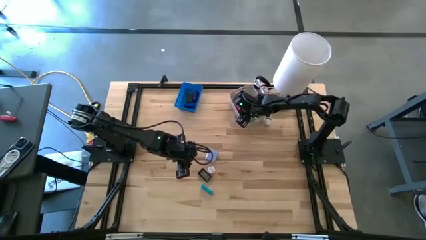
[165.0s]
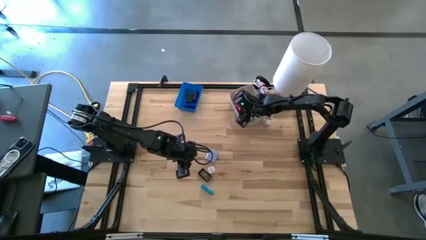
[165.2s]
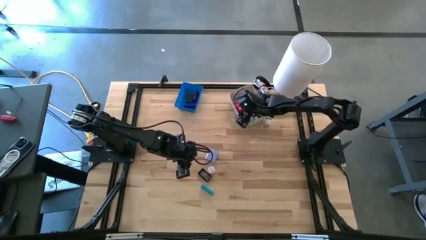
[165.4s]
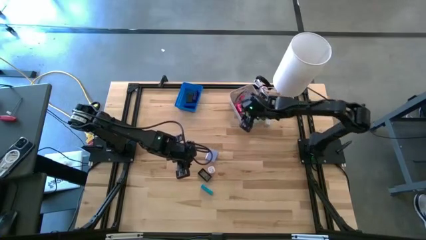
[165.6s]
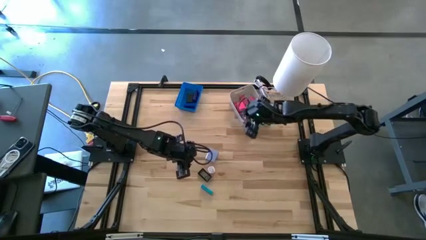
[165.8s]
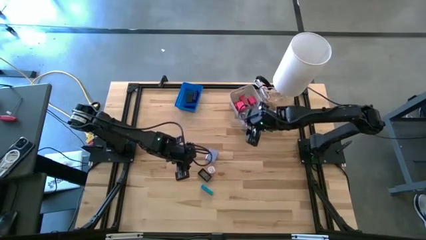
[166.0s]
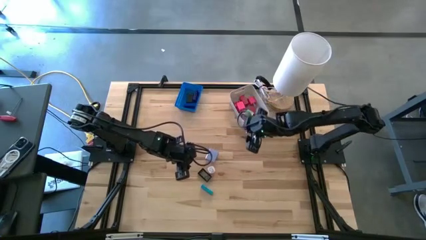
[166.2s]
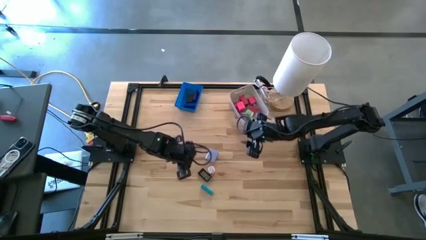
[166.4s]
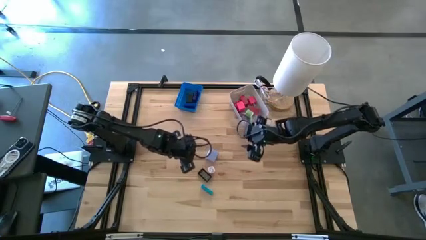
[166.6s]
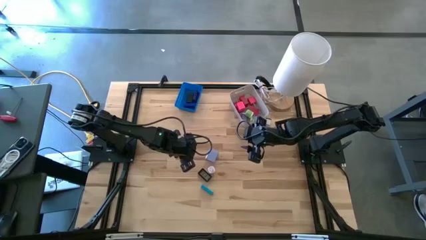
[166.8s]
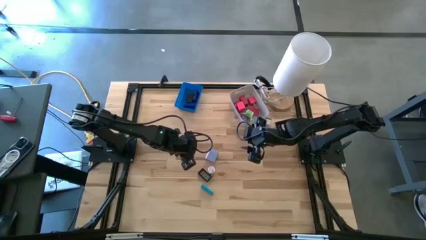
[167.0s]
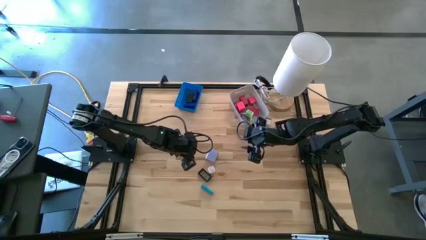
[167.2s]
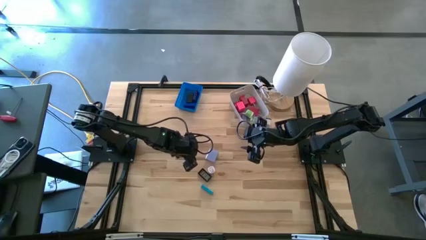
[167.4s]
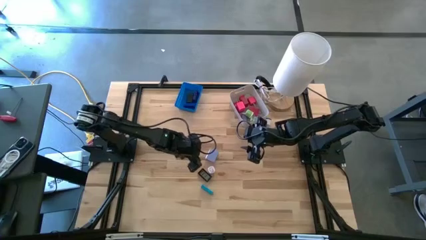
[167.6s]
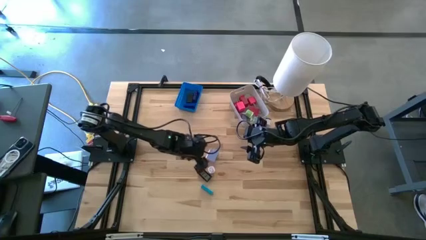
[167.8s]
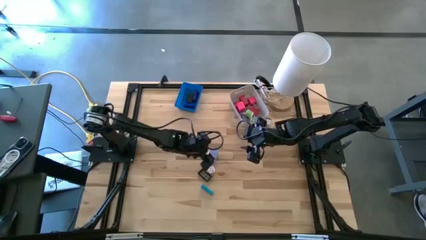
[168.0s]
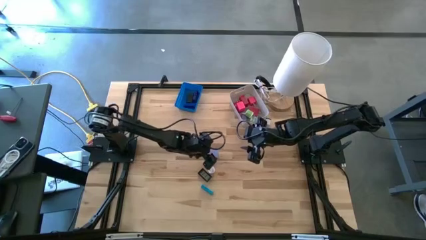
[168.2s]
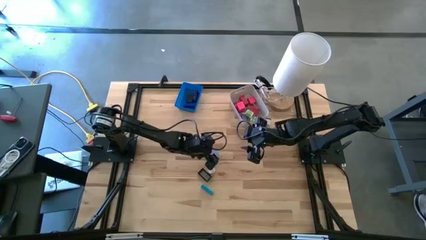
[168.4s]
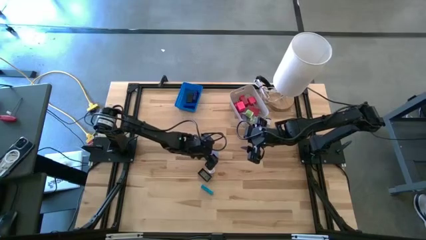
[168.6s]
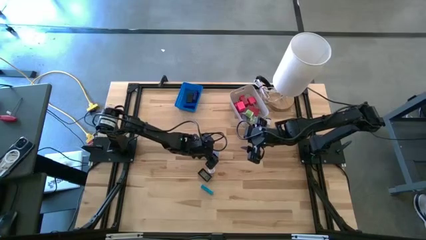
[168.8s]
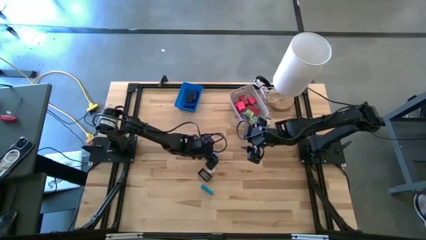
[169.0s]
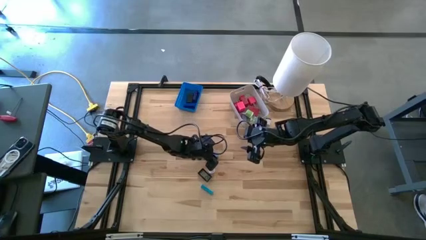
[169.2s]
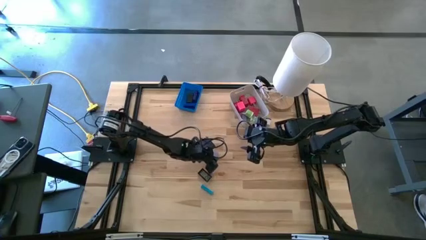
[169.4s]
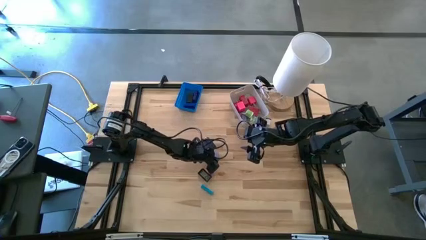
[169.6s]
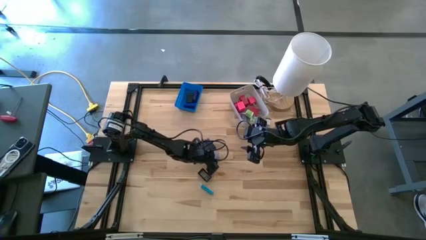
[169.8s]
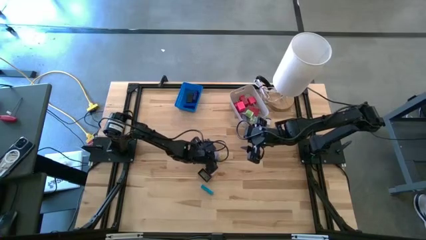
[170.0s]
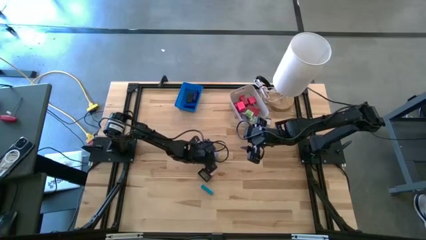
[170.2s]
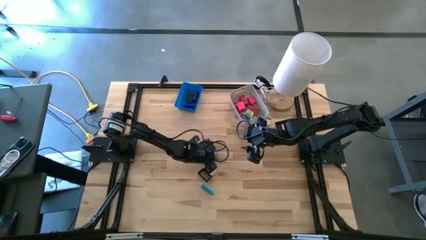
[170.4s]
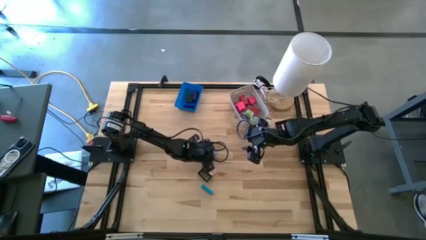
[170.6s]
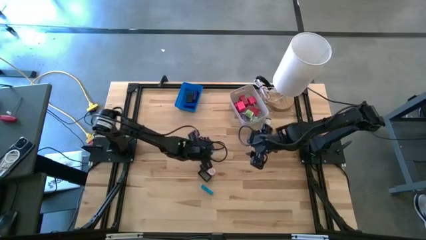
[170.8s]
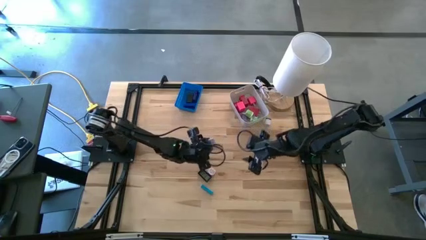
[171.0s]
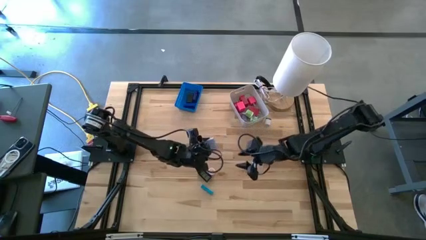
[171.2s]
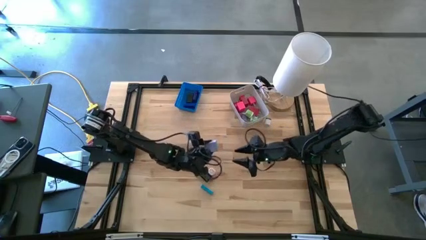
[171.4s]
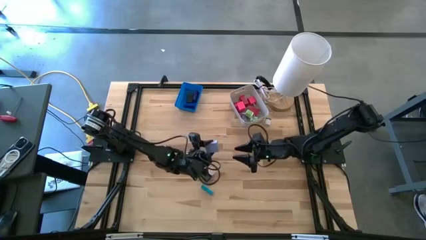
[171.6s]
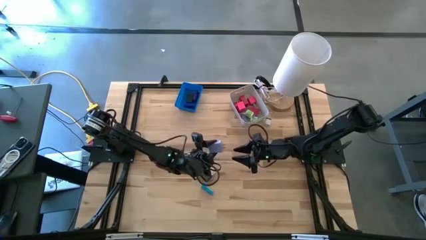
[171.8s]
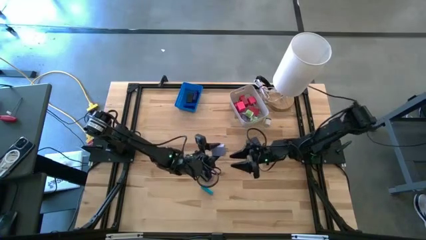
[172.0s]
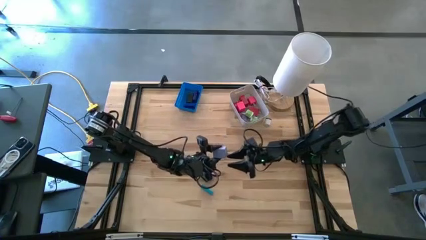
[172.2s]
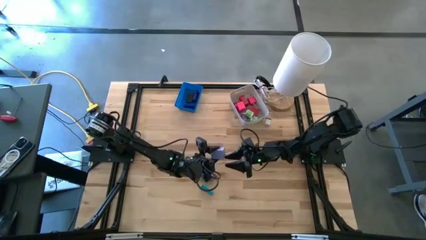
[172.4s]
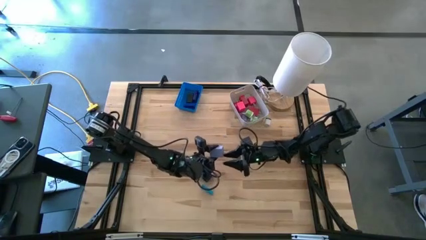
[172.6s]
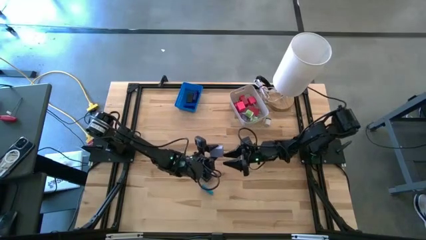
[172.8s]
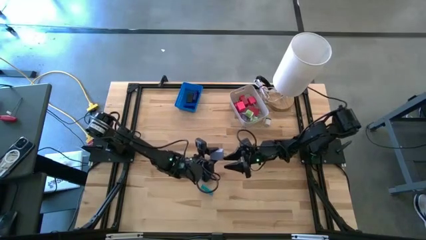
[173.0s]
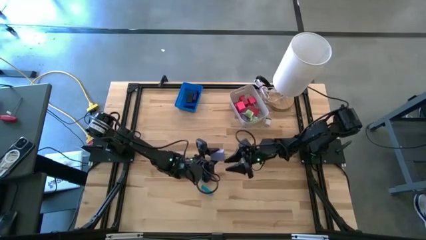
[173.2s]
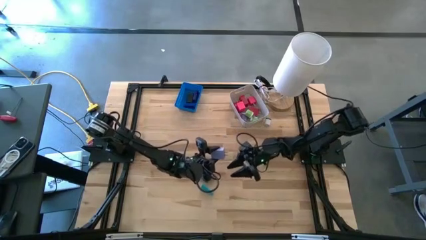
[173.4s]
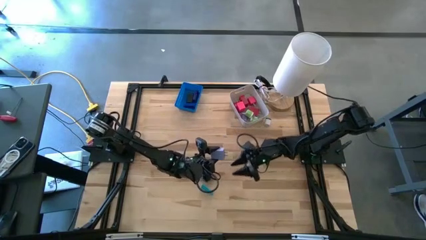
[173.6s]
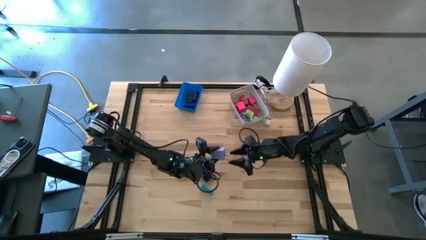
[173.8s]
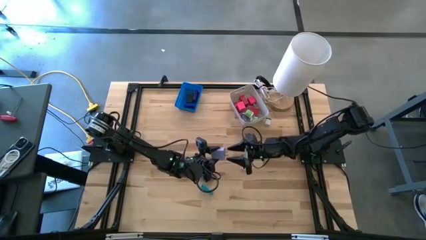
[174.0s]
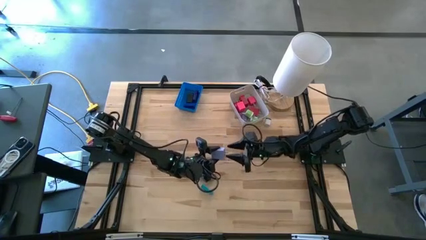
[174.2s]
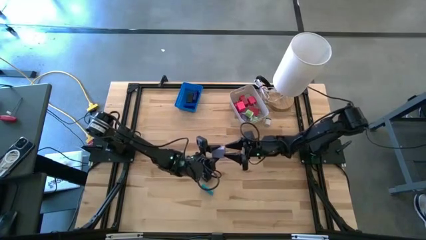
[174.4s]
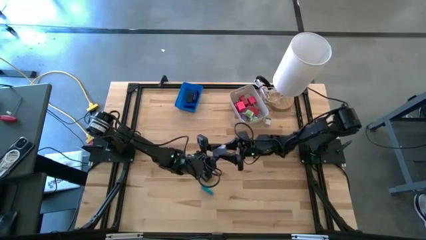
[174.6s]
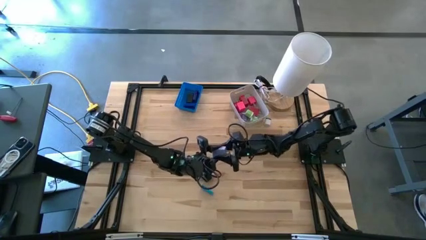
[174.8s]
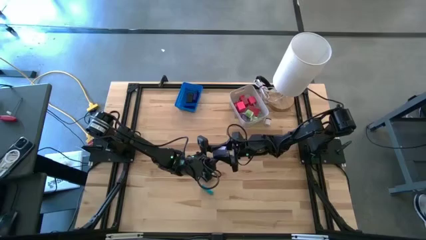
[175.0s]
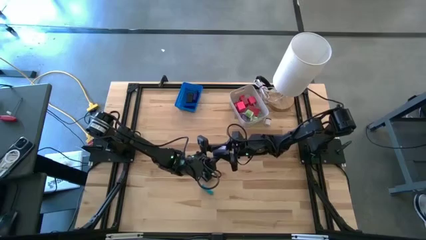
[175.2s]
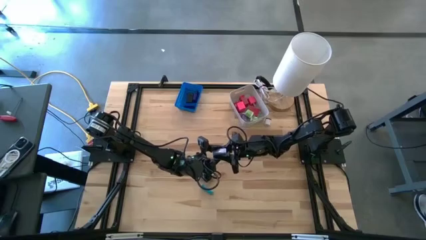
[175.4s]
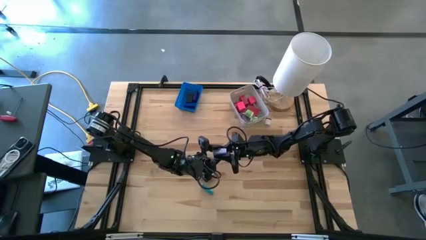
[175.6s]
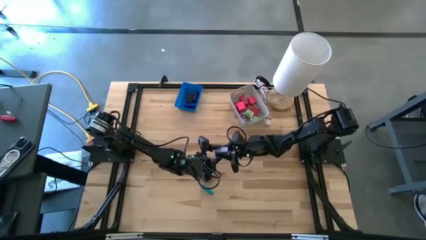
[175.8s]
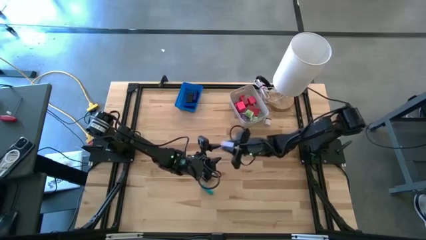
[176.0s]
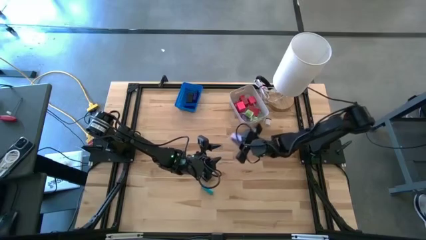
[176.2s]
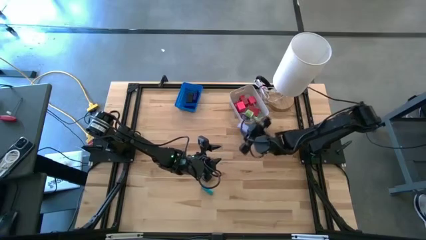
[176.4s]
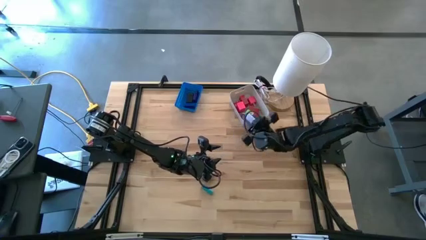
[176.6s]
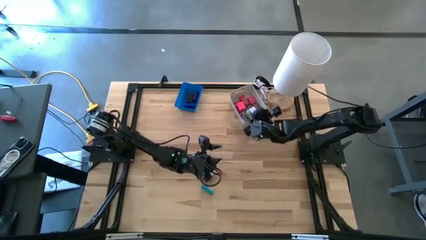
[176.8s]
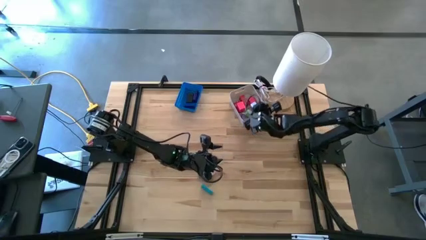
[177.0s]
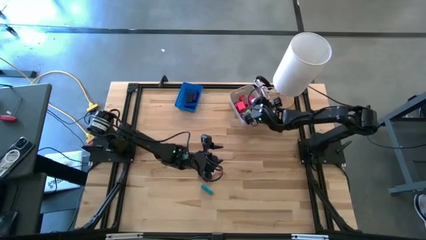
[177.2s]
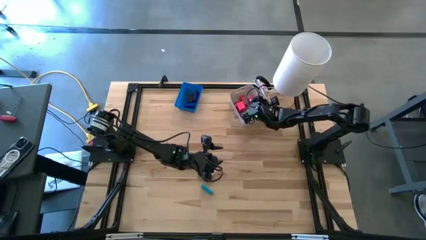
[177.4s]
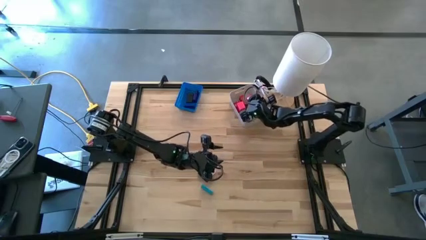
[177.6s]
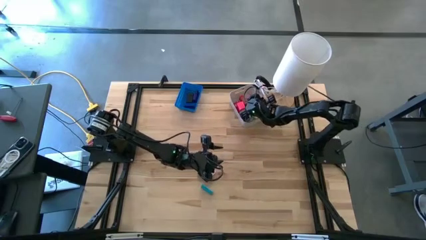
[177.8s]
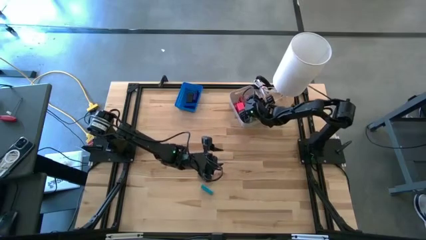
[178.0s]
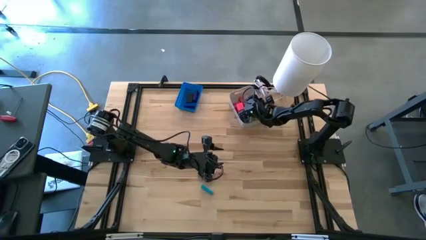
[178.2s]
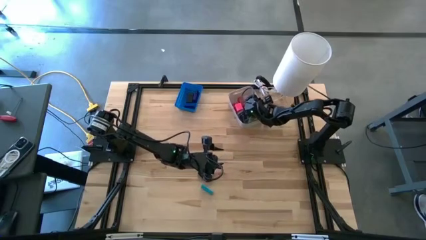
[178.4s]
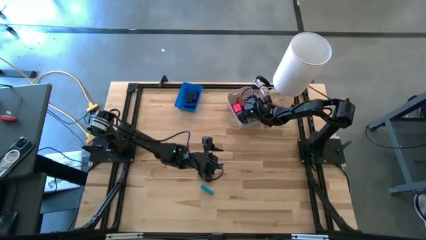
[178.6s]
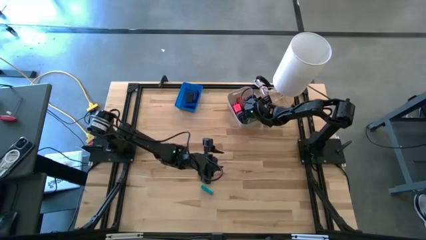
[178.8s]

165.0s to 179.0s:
Task: Pick & Place Office items
Put the light purple charger adapter into the white bin
